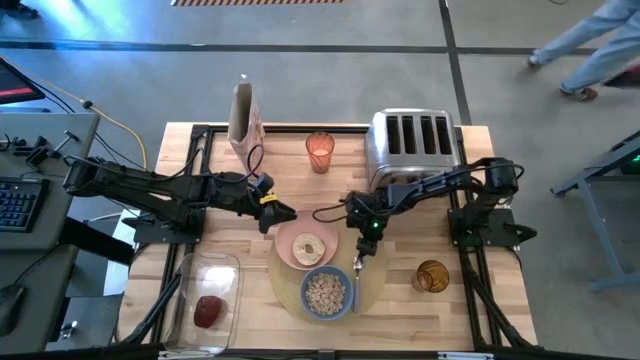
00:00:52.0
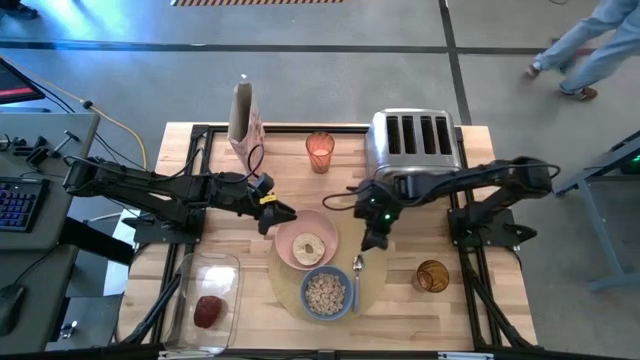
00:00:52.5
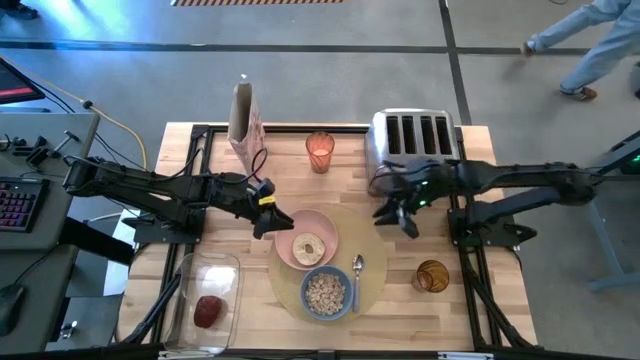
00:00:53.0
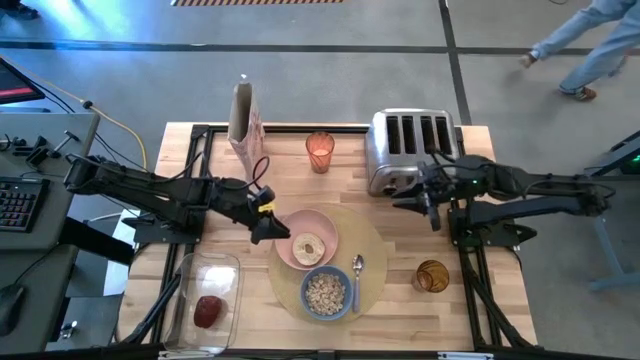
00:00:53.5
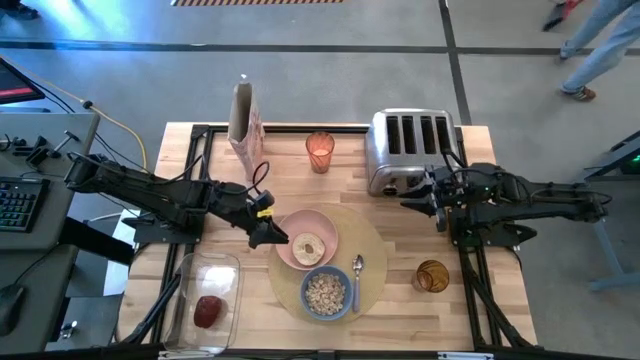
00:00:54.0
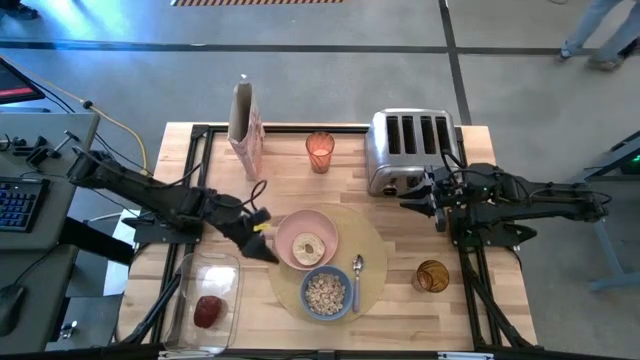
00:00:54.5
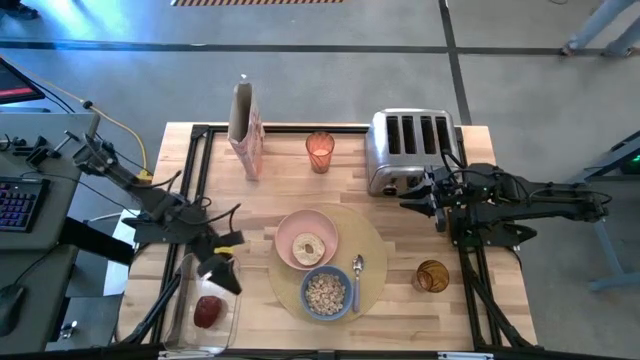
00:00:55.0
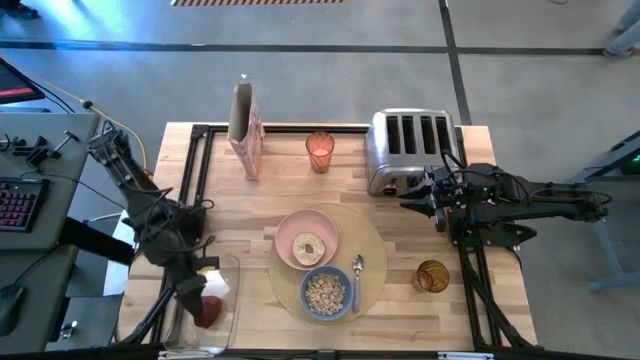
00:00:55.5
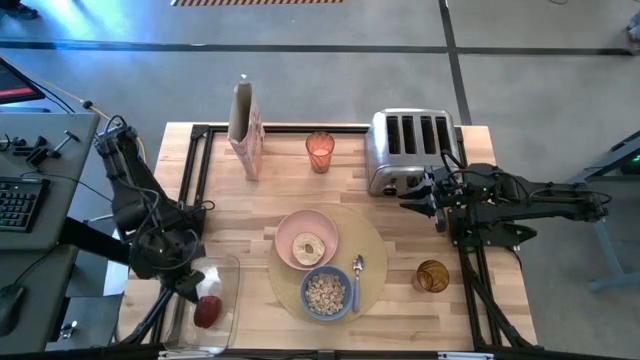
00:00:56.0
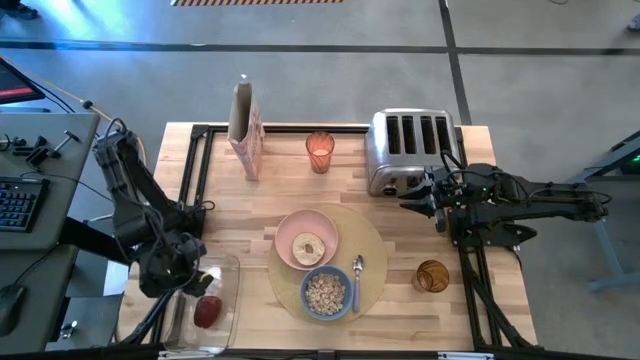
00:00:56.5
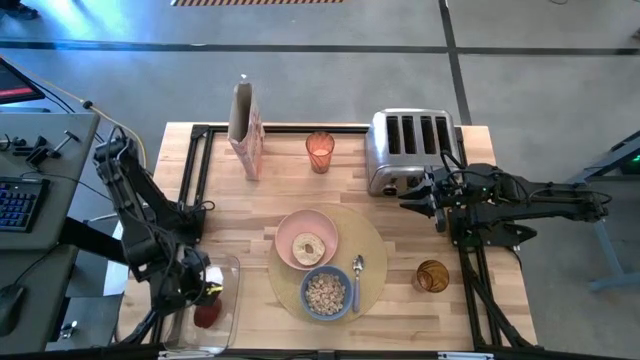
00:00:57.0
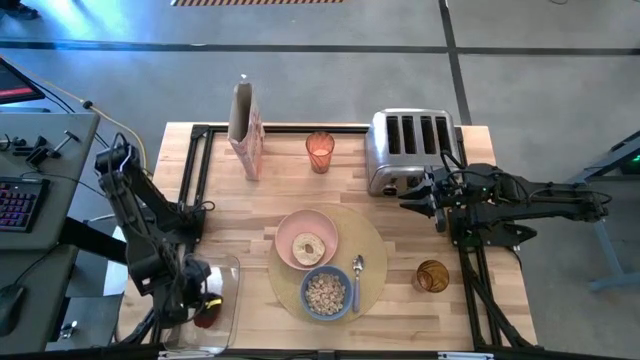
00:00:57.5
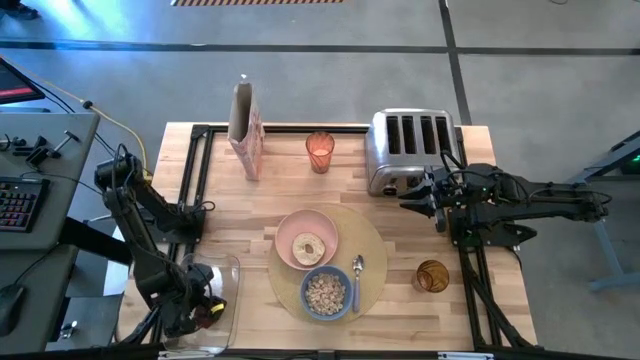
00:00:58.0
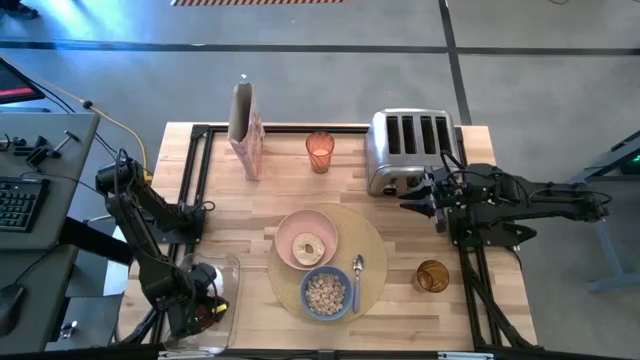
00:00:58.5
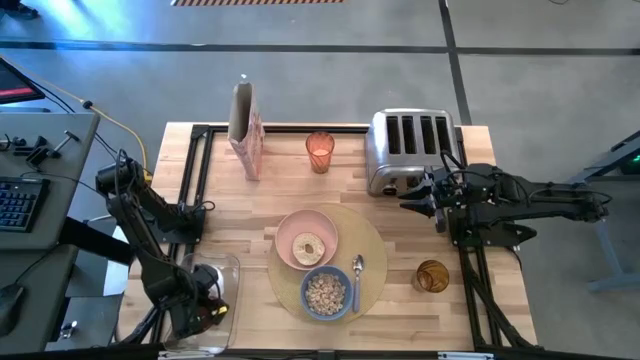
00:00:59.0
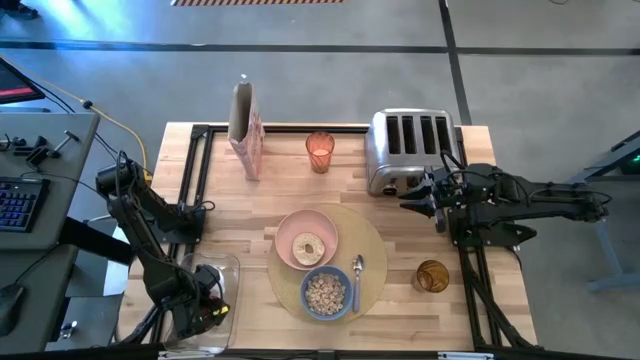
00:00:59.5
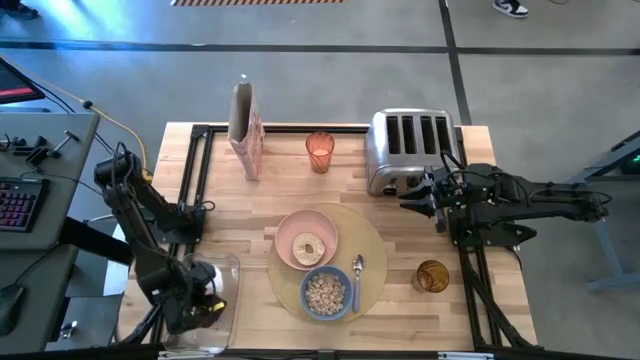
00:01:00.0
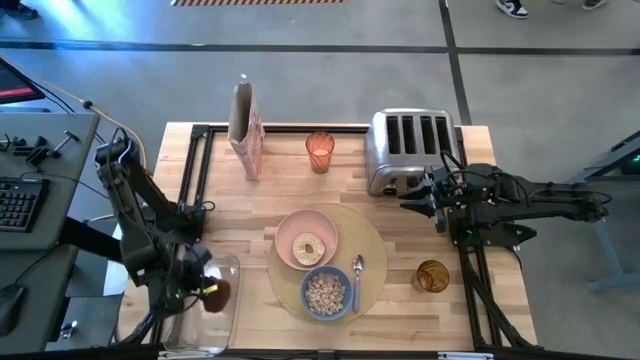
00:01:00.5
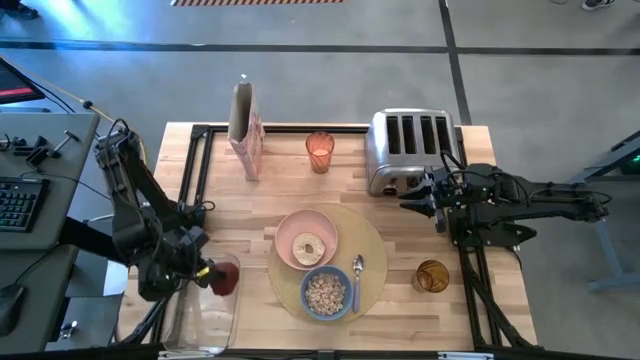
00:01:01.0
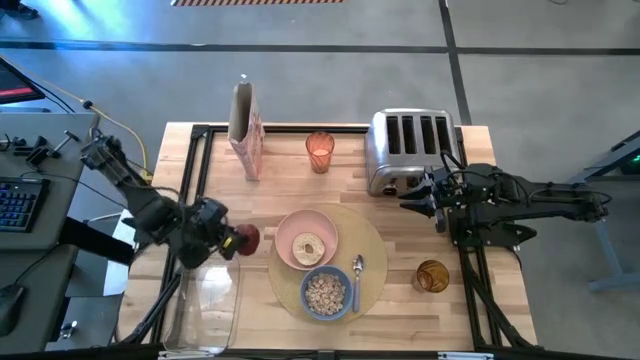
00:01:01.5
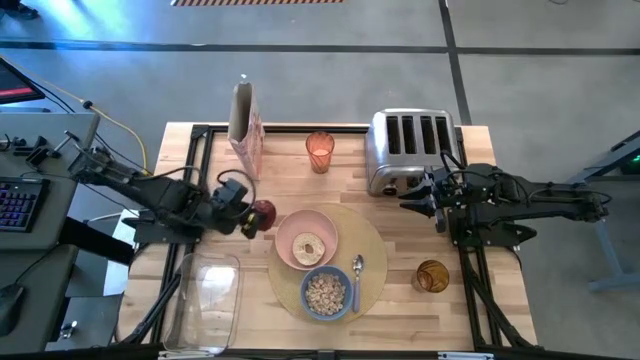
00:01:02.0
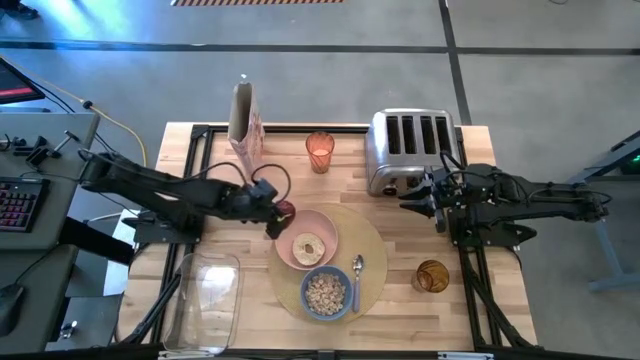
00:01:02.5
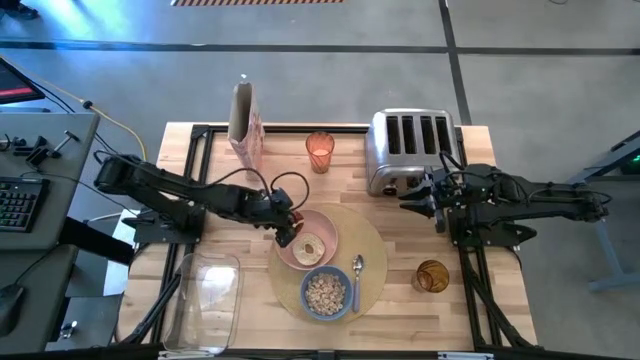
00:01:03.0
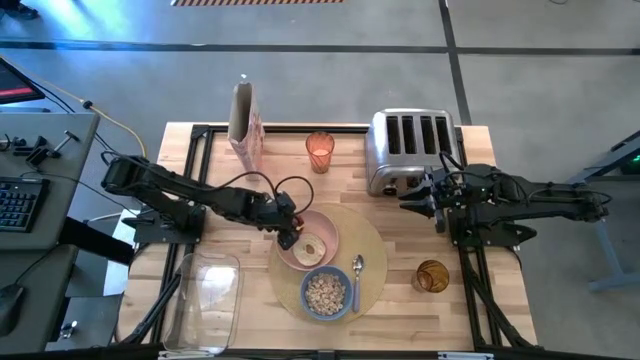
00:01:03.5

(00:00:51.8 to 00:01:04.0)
Task: Arrange a breakfast setting
Put the apple onto the peach plate

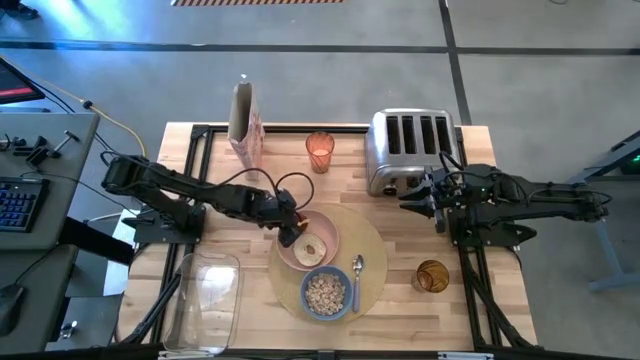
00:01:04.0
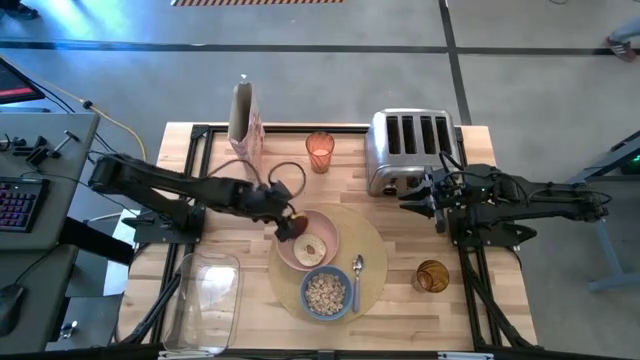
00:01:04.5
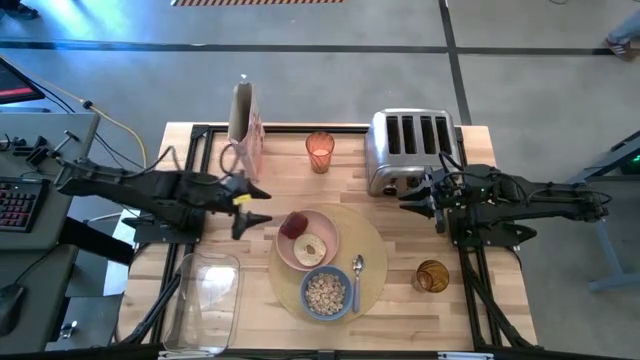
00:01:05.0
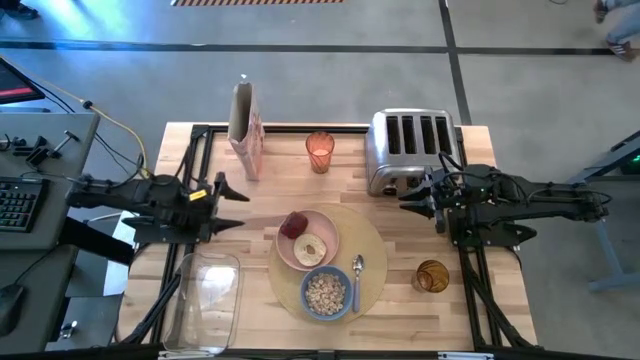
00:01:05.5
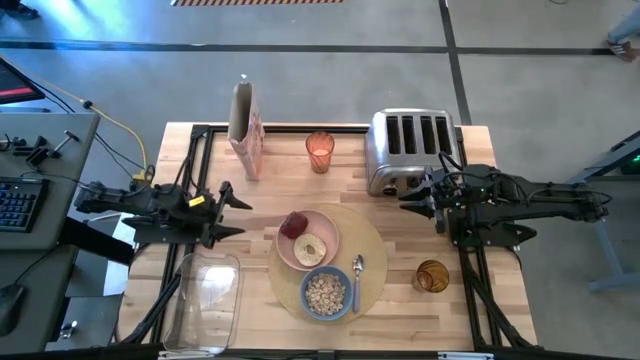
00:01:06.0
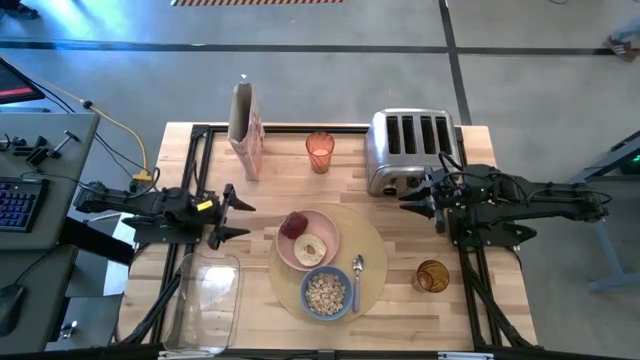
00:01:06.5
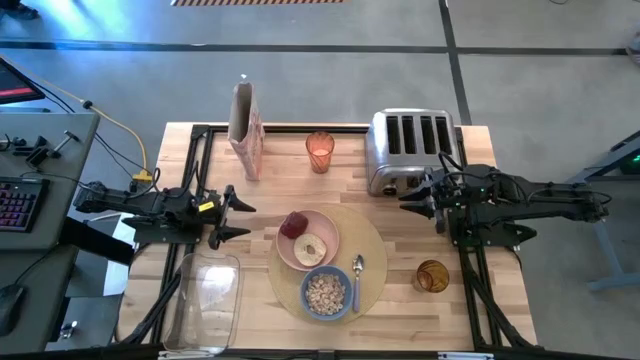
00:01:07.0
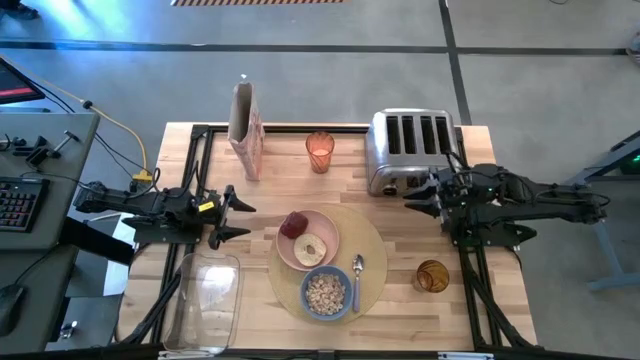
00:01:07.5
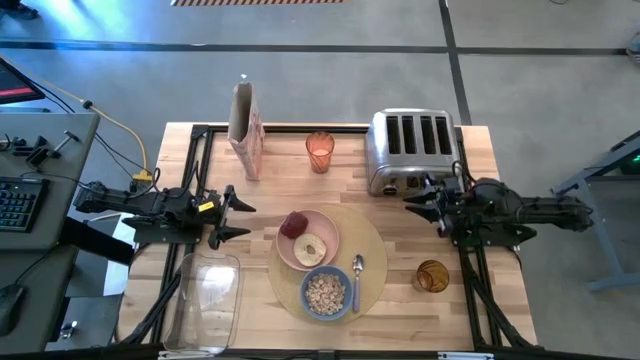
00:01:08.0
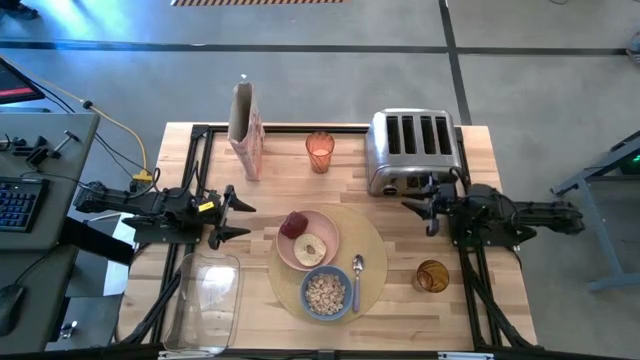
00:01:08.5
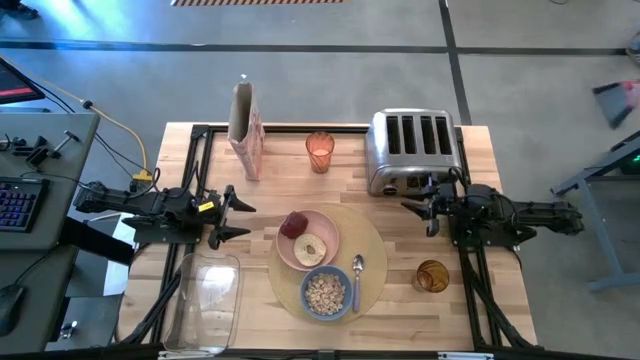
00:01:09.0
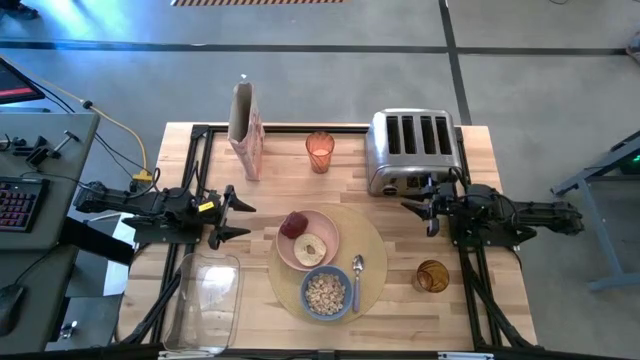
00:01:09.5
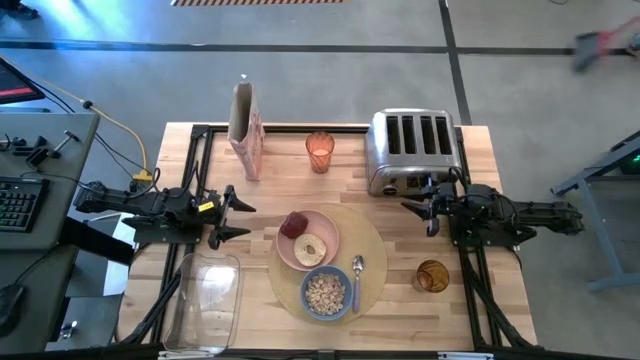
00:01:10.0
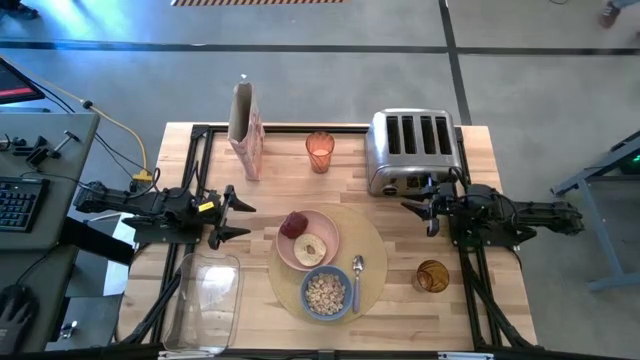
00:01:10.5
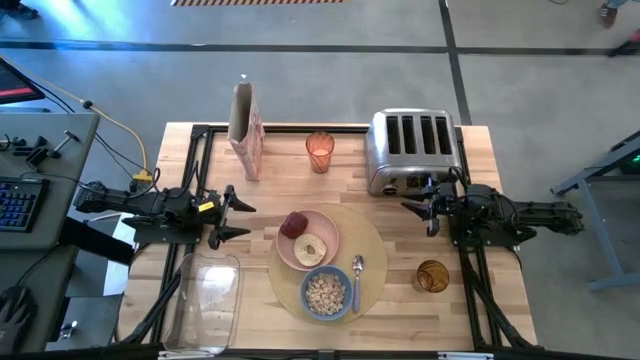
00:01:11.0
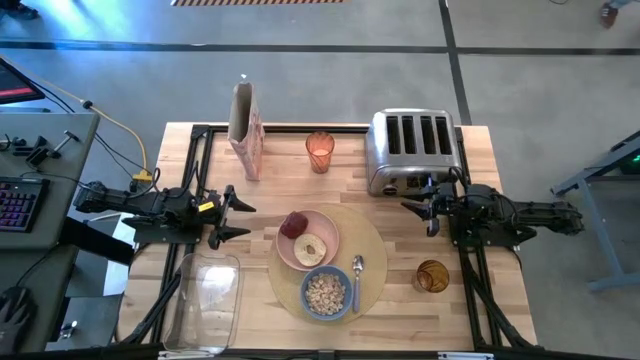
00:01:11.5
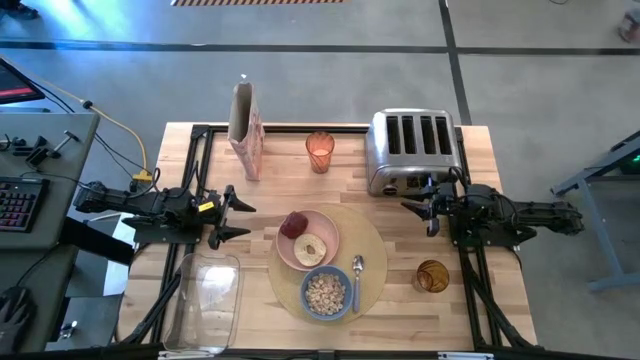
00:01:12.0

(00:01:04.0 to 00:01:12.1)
Return to home position

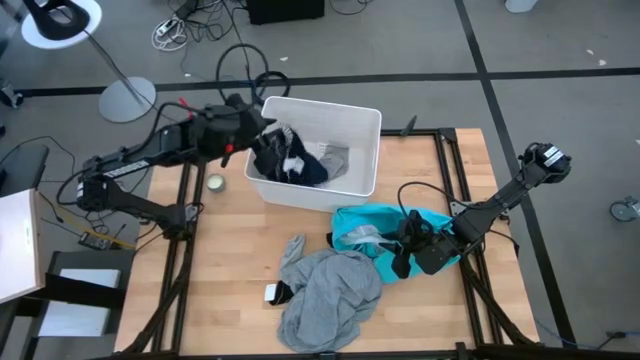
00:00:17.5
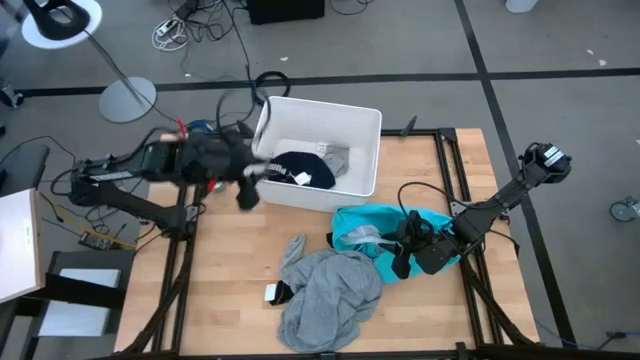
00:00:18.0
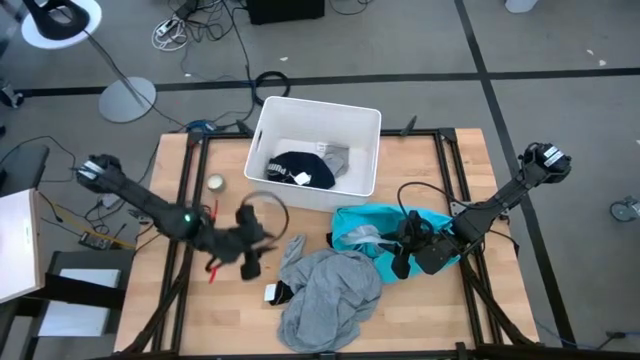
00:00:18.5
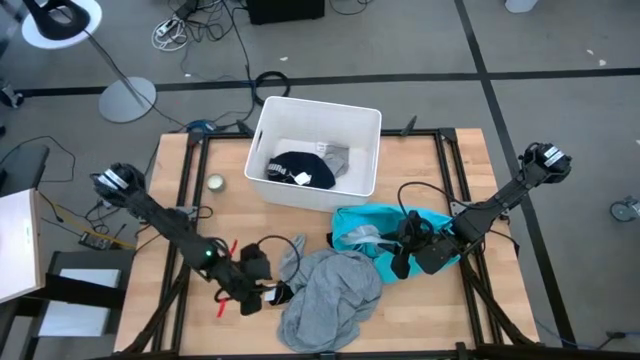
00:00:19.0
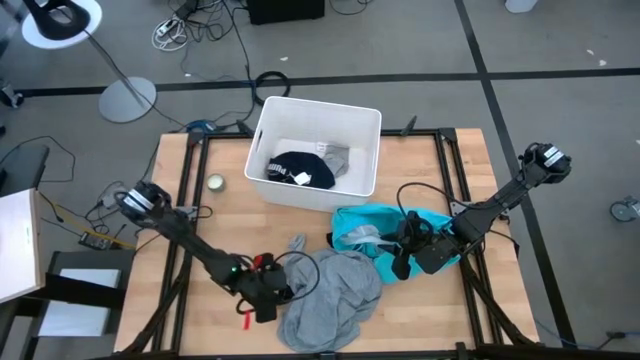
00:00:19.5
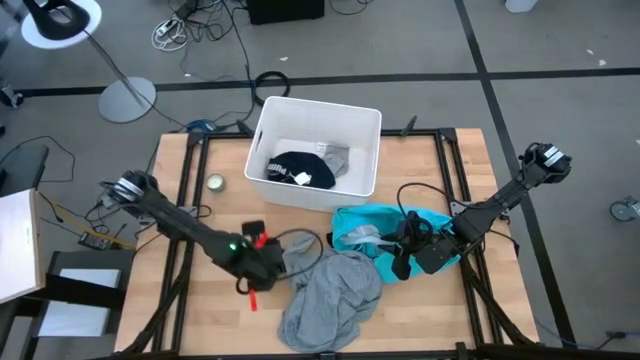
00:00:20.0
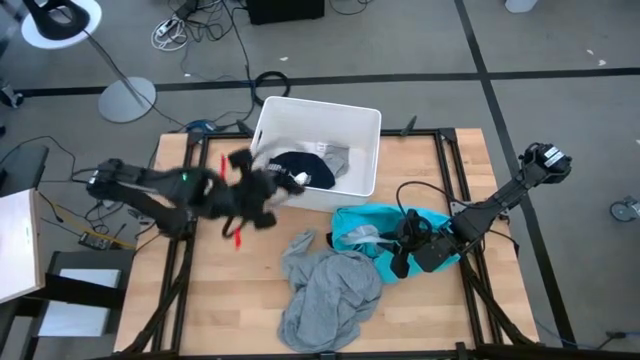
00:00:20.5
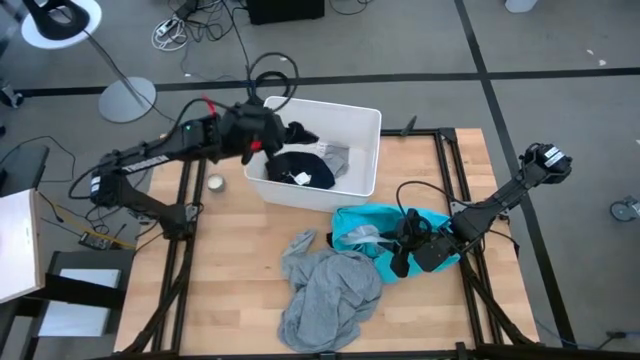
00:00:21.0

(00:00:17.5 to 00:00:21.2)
Task: Sort clothes
Put the black sock into the laundry bin
